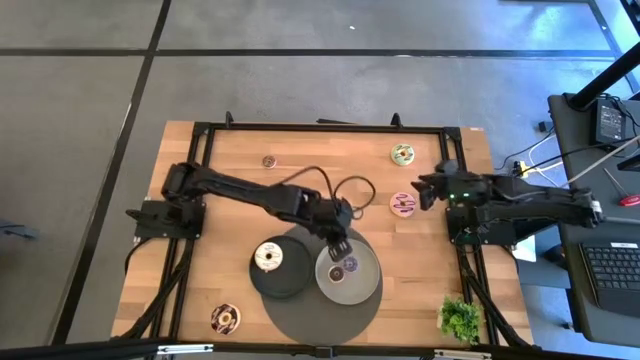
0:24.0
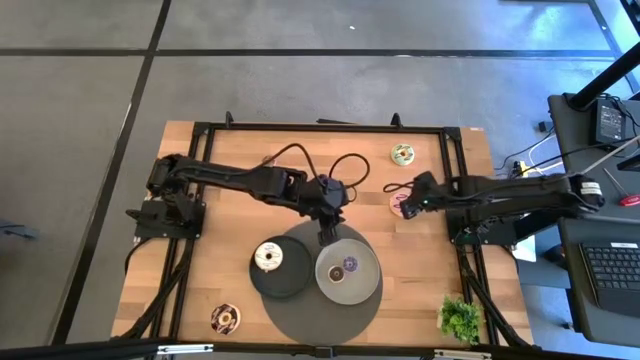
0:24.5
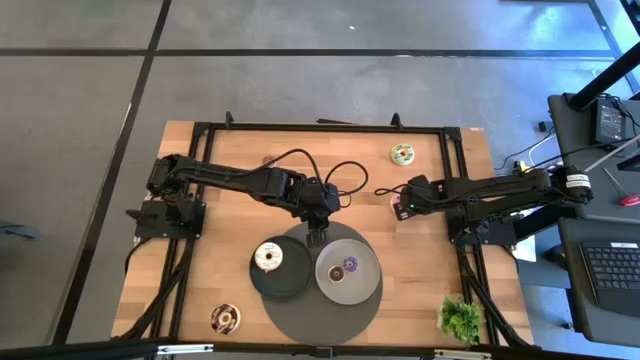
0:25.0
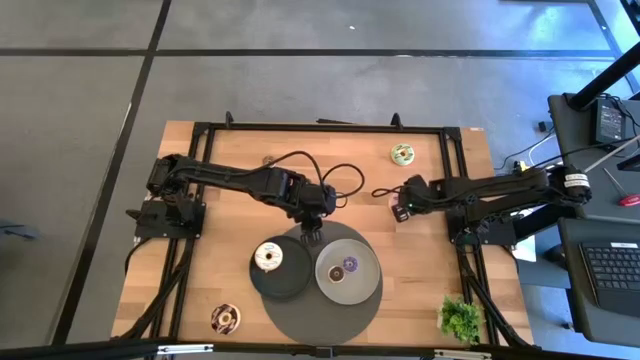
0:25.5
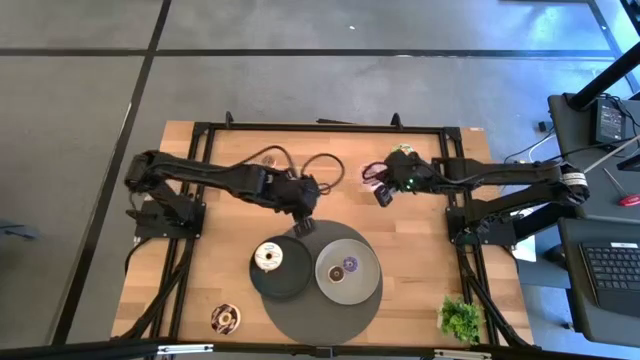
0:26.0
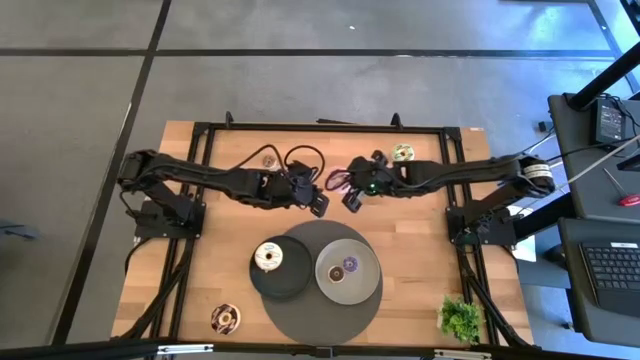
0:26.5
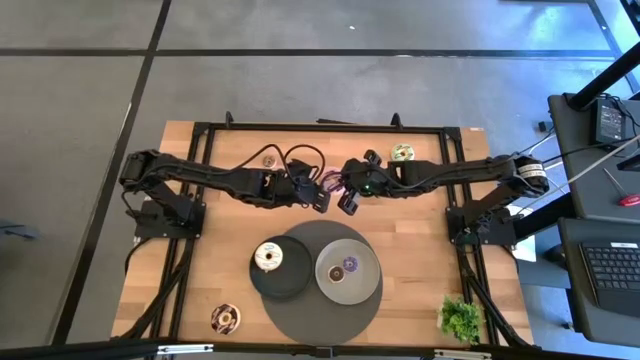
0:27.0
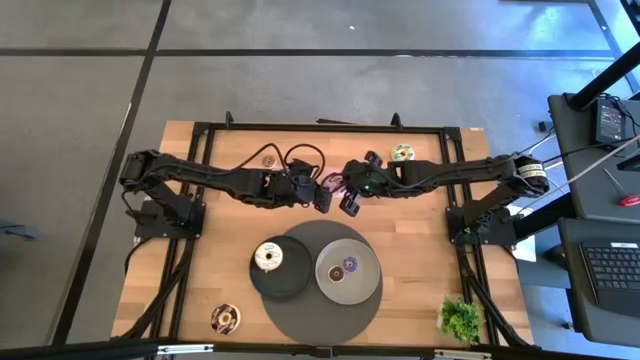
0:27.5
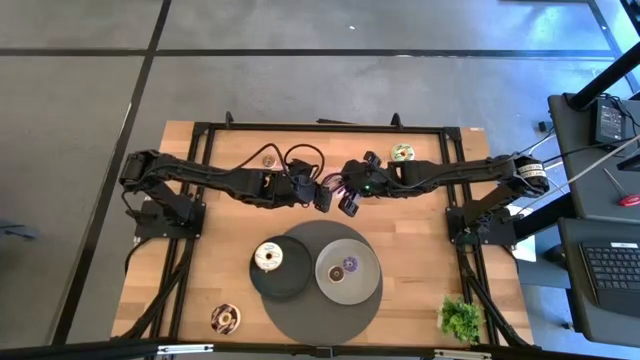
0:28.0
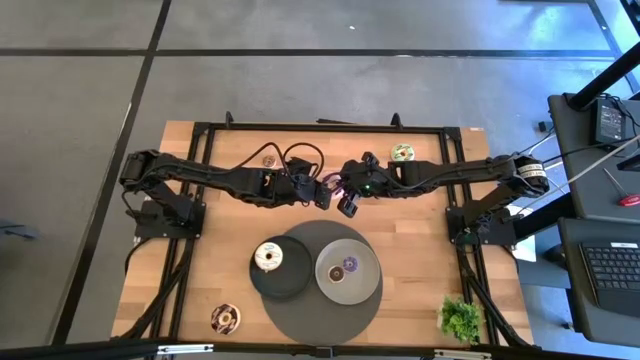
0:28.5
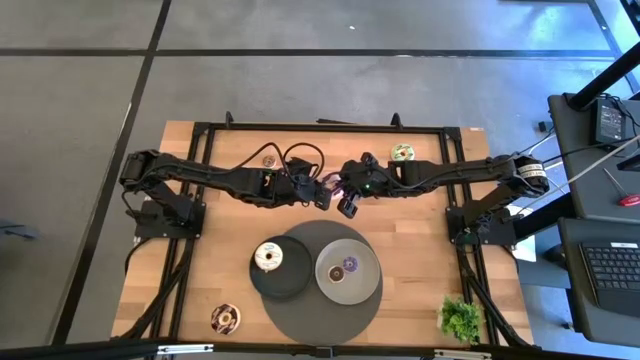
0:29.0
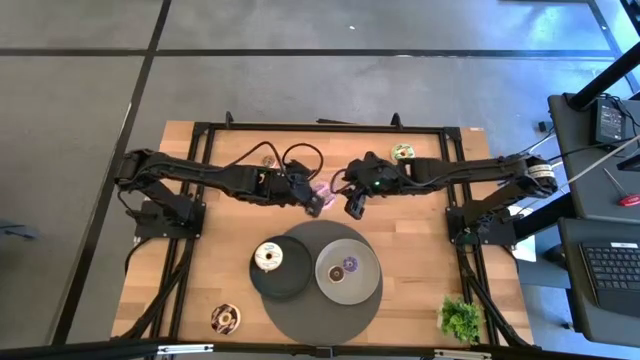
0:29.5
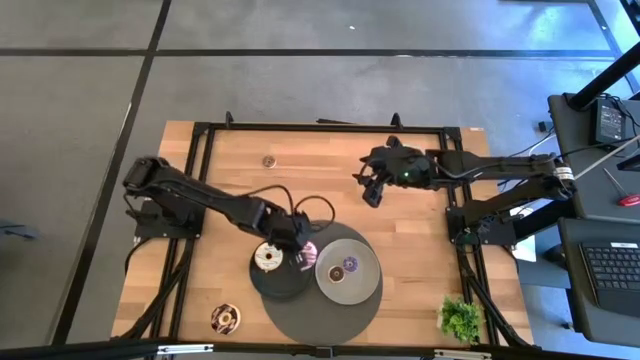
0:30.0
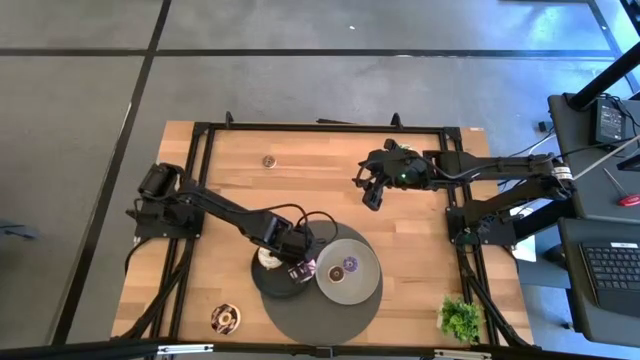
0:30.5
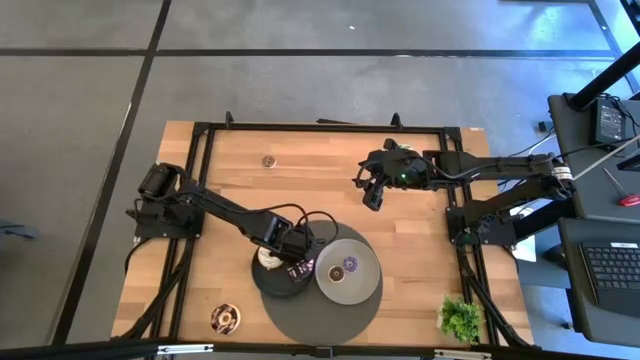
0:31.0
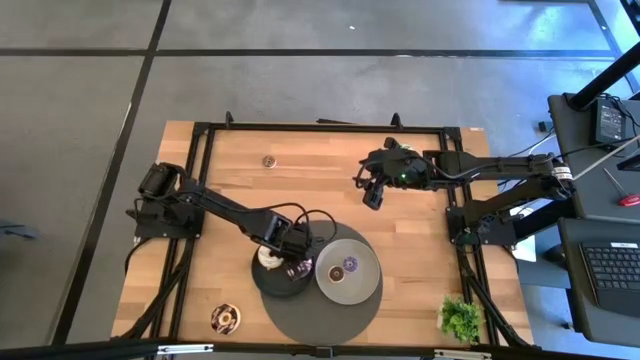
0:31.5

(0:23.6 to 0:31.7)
Task: Pick & Place donuts
Put the big purple donut on the black plate

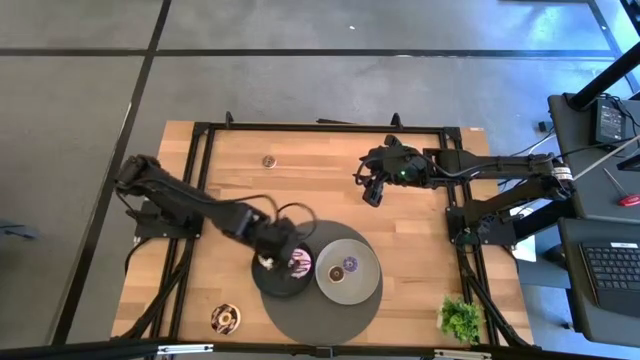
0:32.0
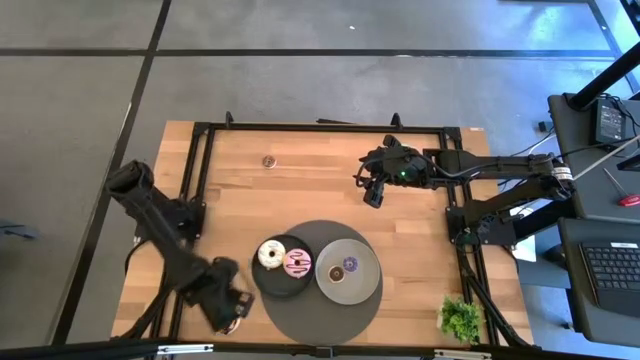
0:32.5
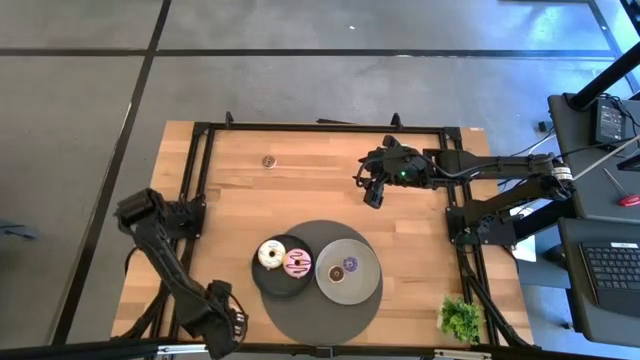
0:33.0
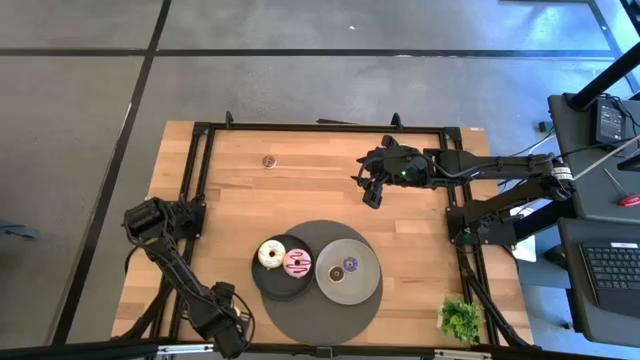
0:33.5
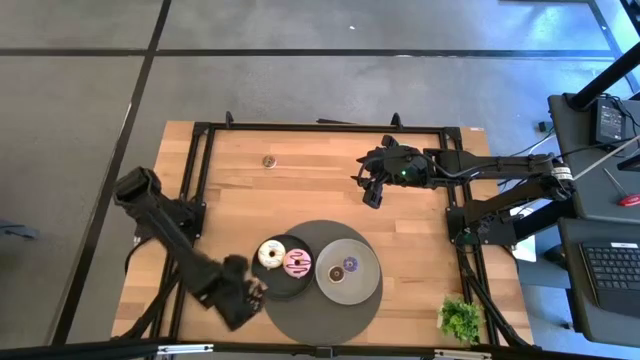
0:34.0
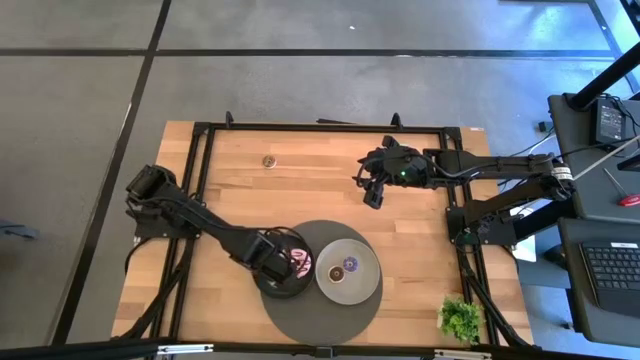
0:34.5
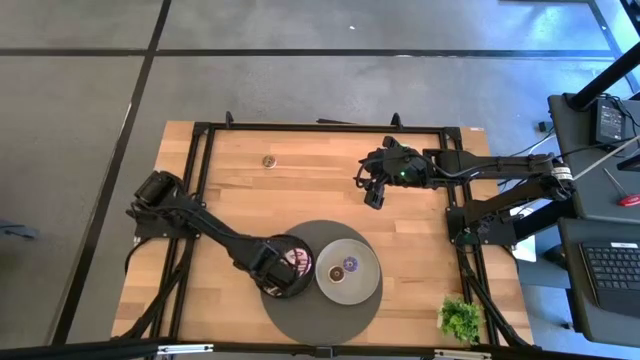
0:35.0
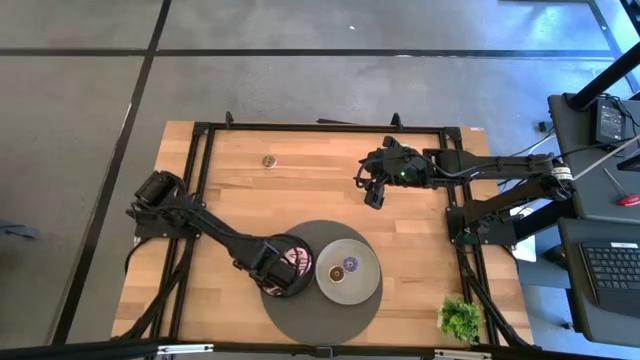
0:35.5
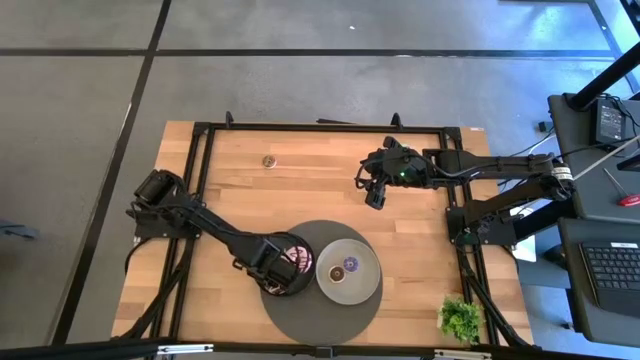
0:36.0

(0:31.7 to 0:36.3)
Put the big black donut on the black plate

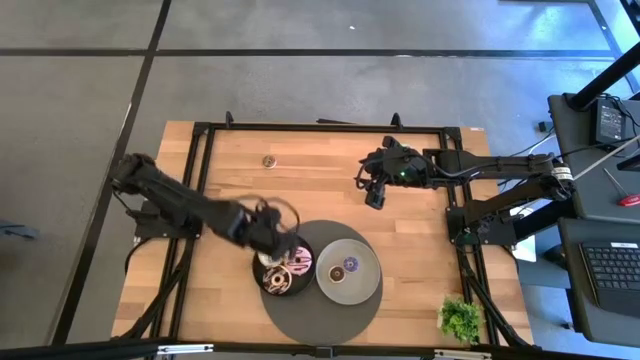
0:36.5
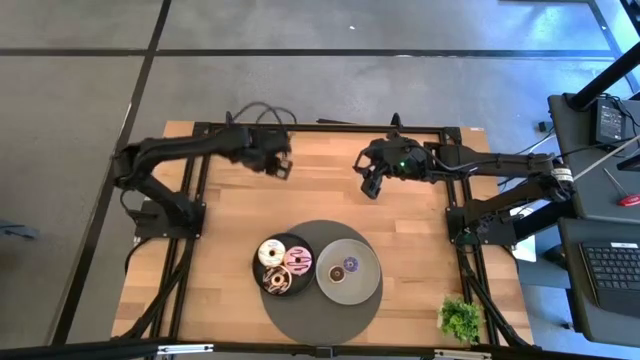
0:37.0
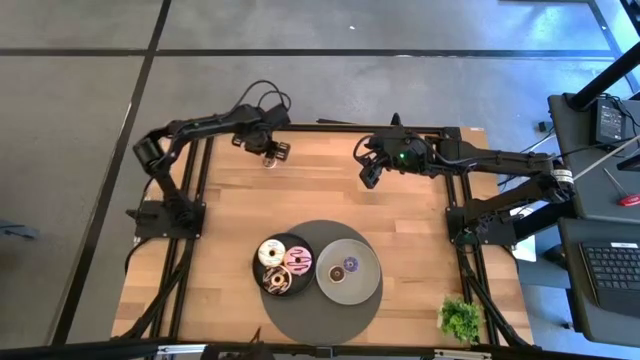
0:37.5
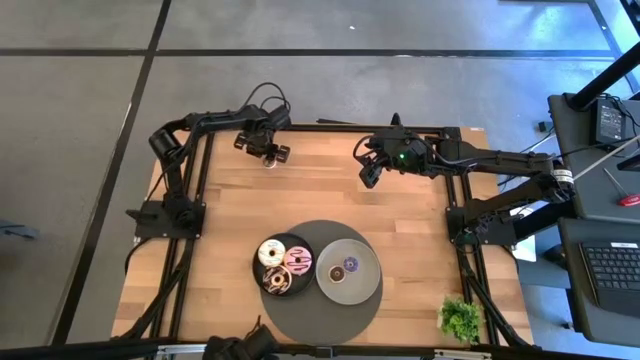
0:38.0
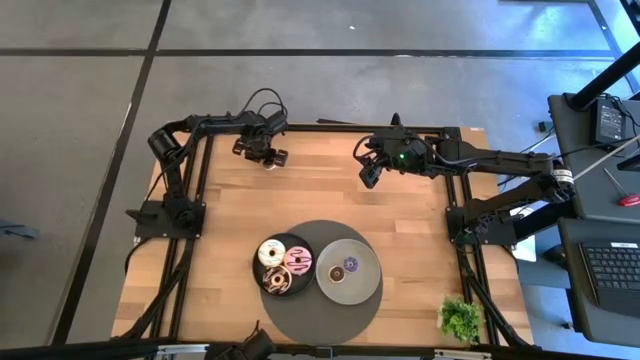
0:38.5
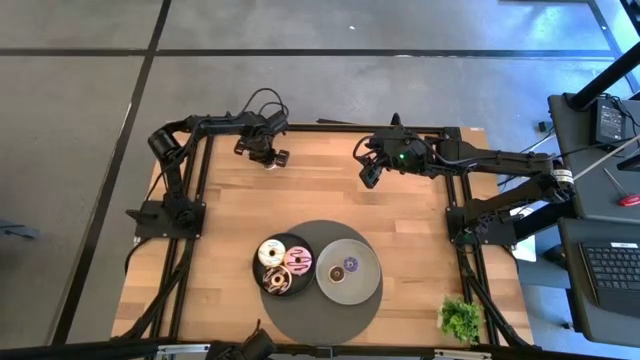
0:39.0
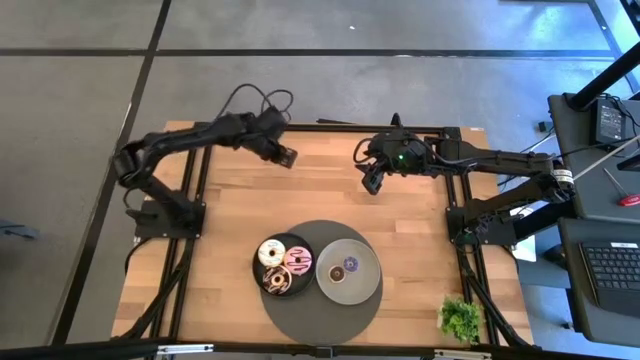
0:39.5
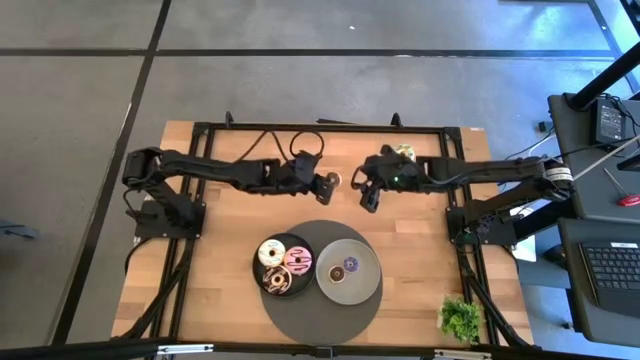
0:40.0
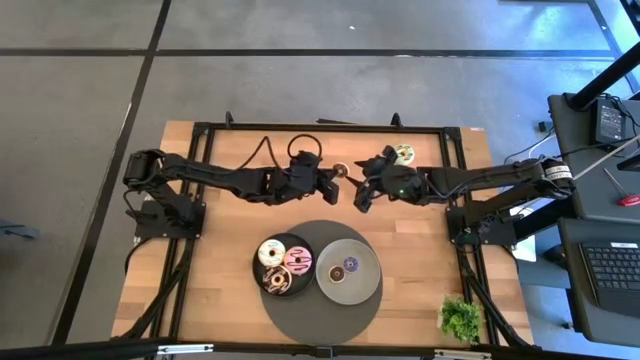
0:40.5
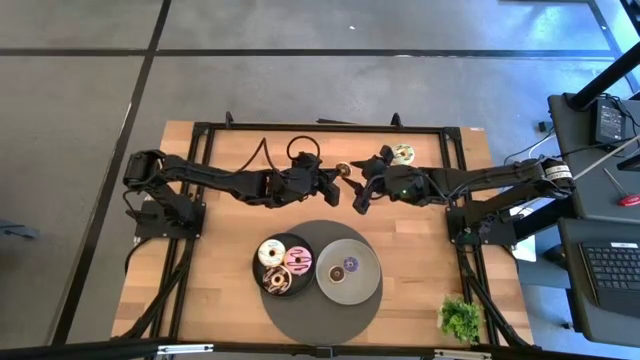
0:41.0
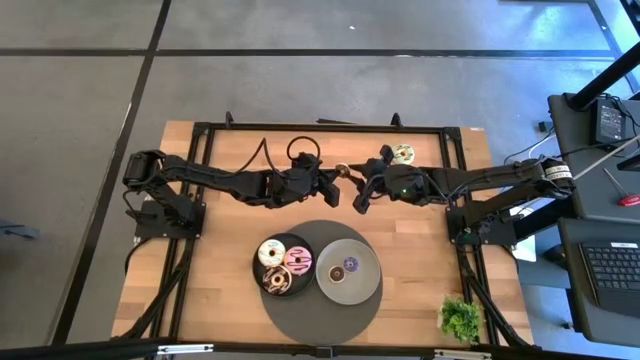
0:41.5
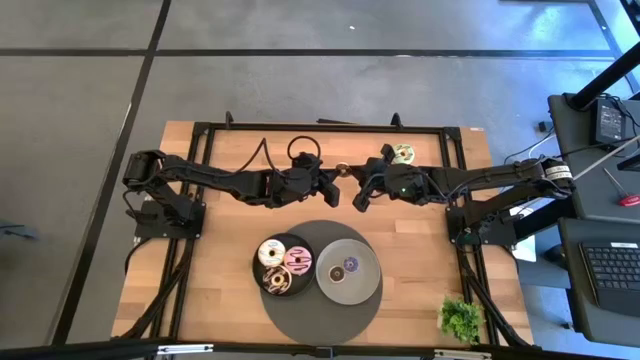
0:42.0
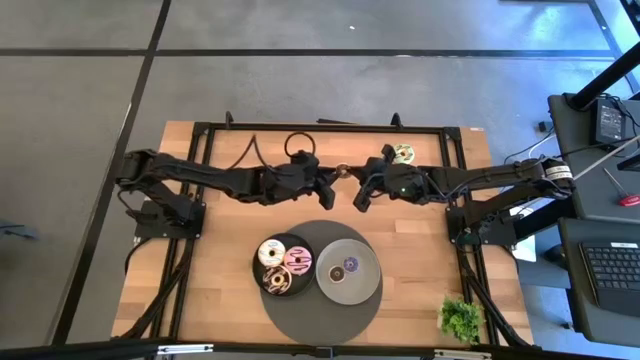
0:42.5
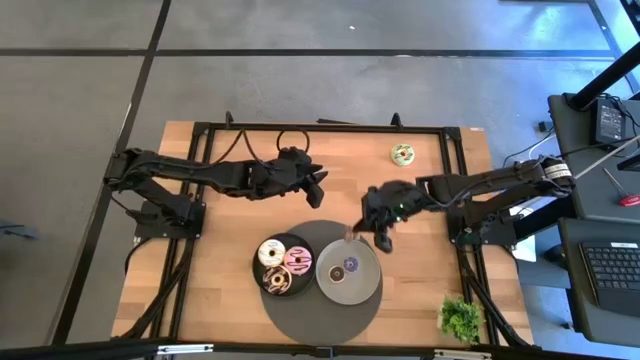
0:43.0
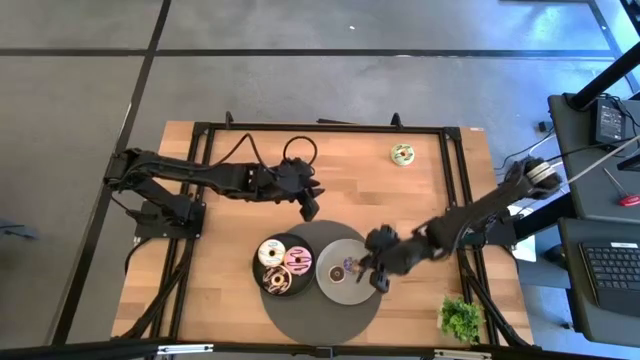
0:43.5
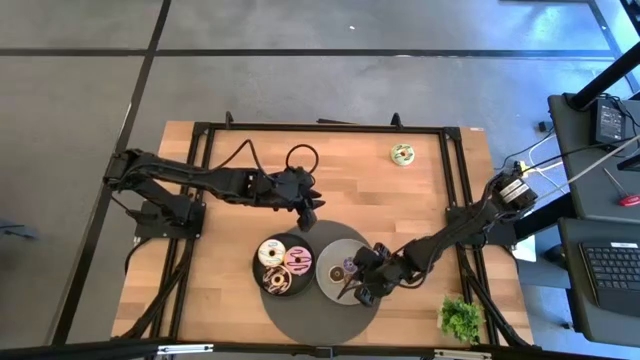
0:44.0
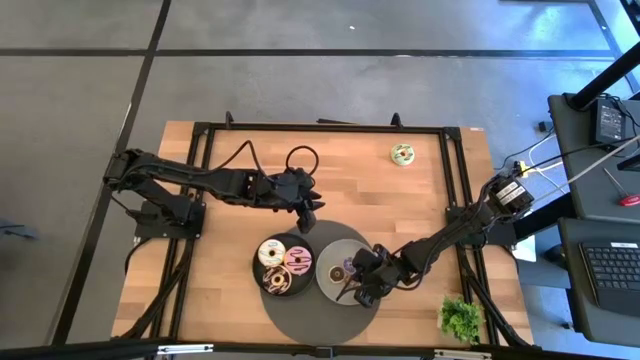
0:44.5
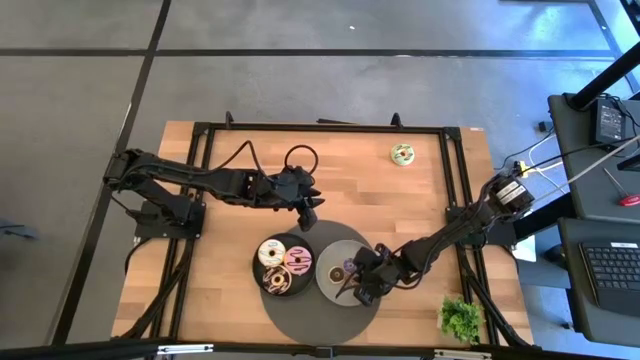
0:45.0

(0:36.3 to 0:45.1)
Put the small brown donut on the gray plate
